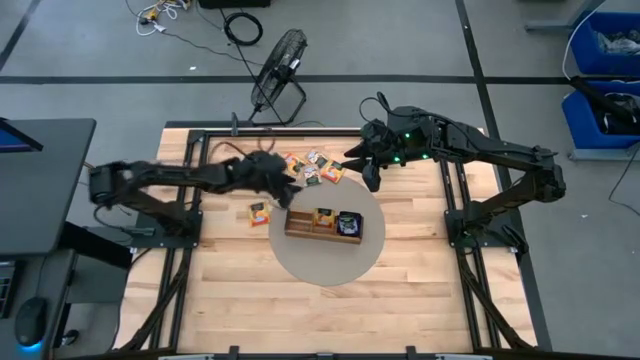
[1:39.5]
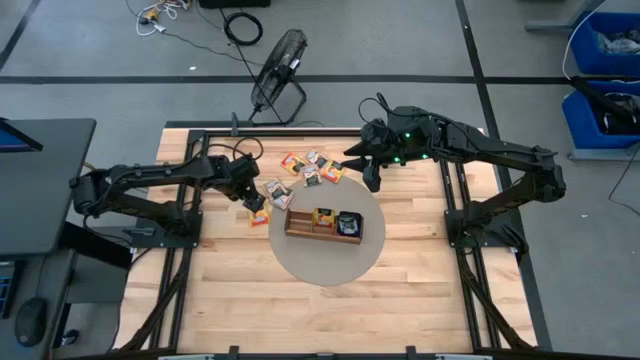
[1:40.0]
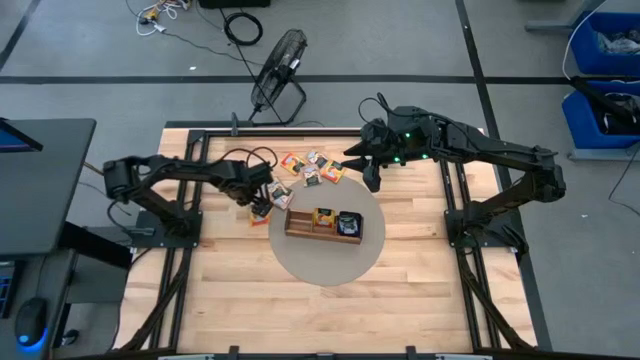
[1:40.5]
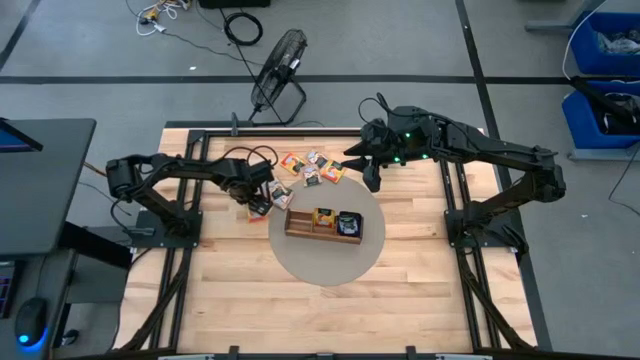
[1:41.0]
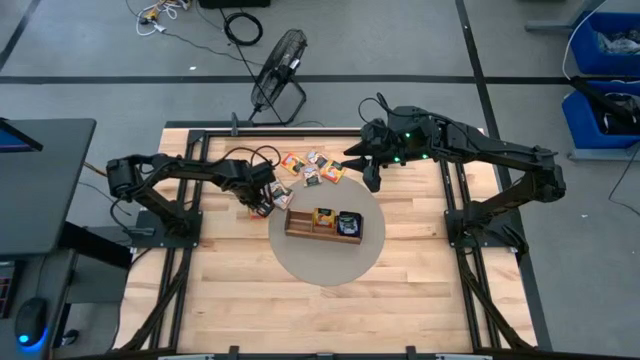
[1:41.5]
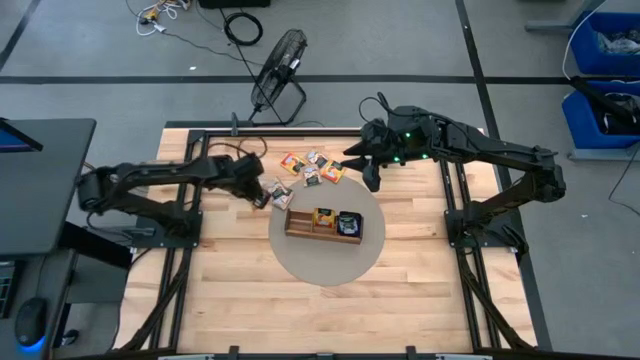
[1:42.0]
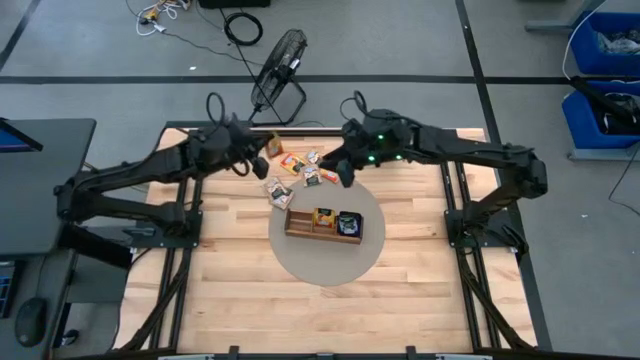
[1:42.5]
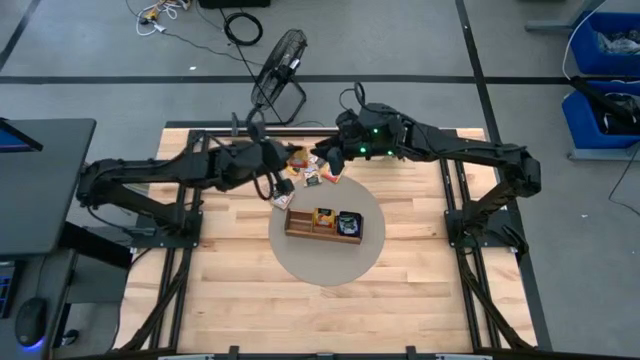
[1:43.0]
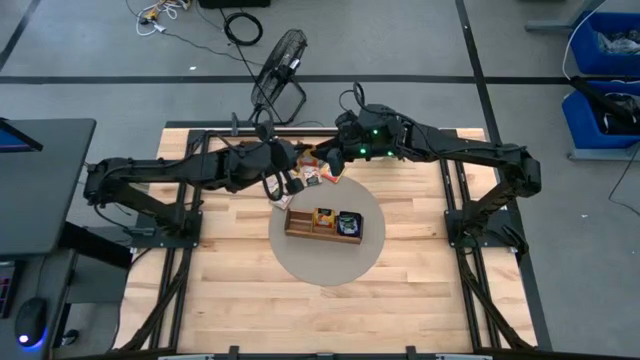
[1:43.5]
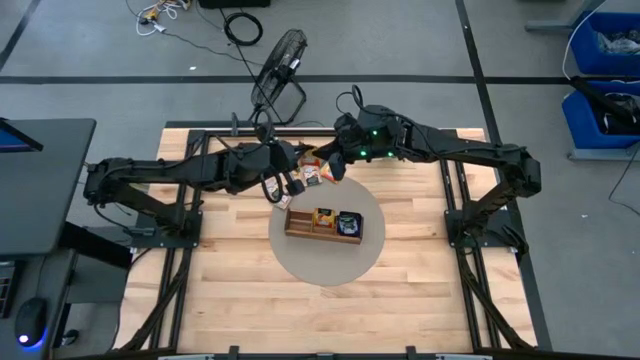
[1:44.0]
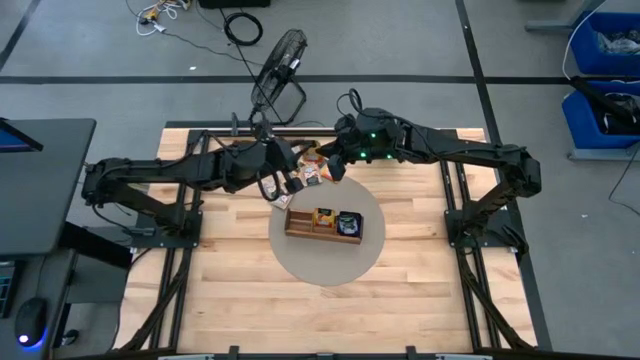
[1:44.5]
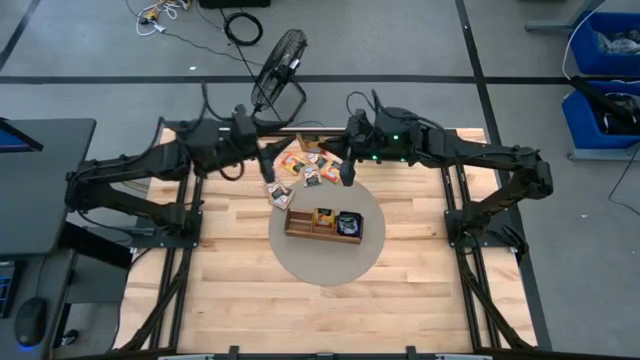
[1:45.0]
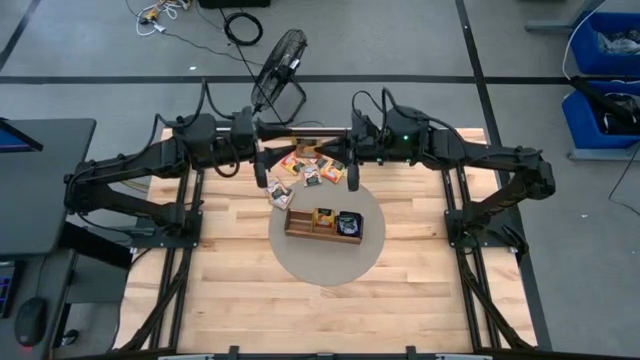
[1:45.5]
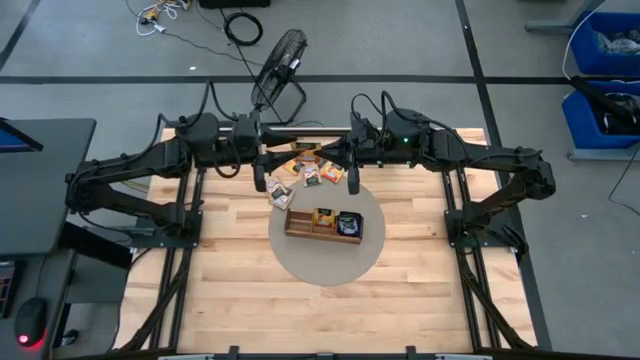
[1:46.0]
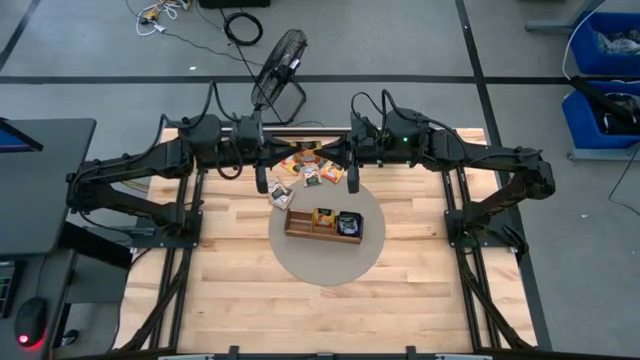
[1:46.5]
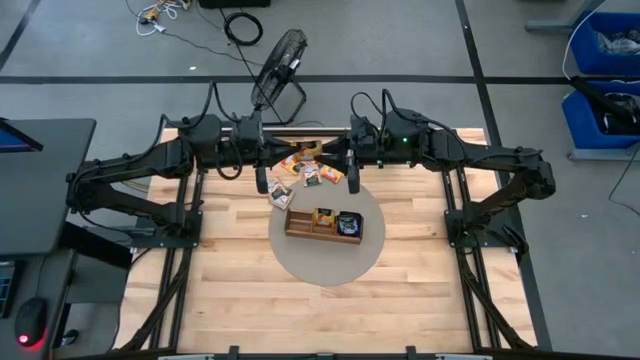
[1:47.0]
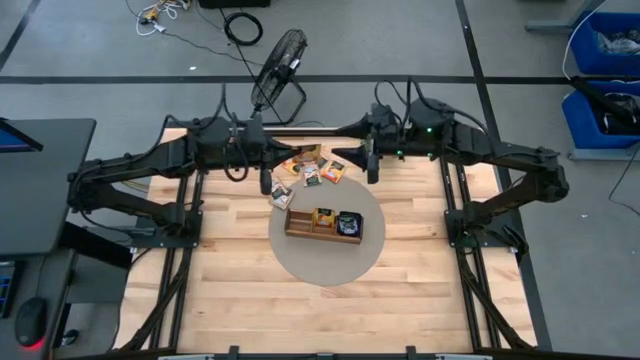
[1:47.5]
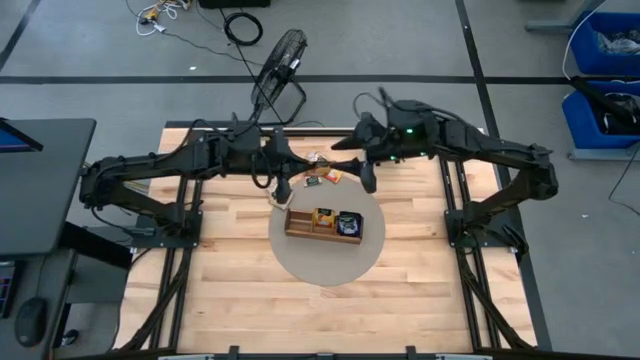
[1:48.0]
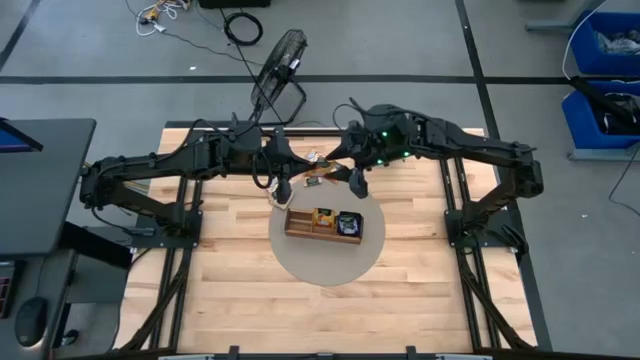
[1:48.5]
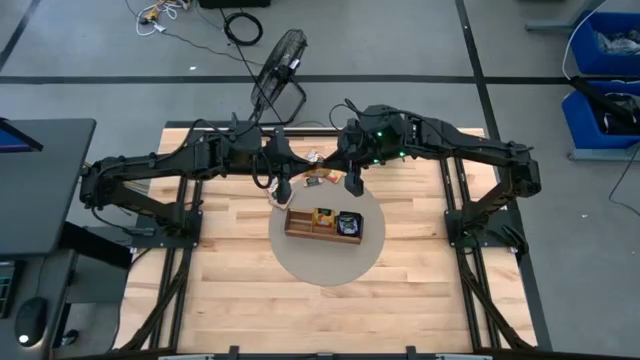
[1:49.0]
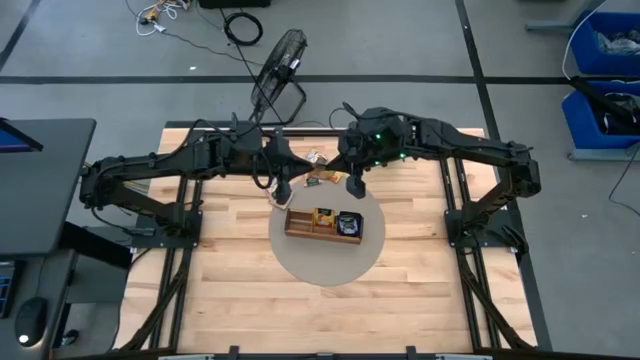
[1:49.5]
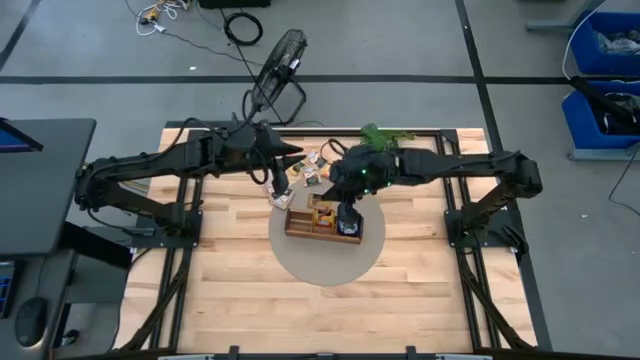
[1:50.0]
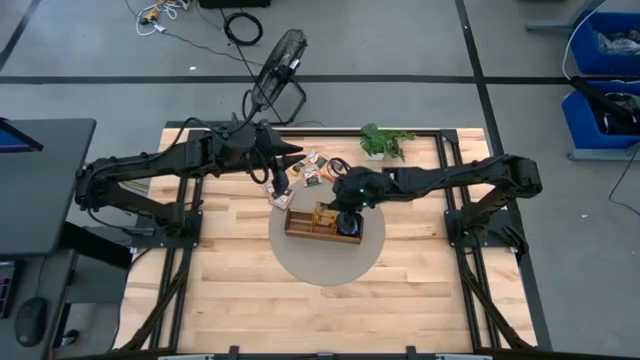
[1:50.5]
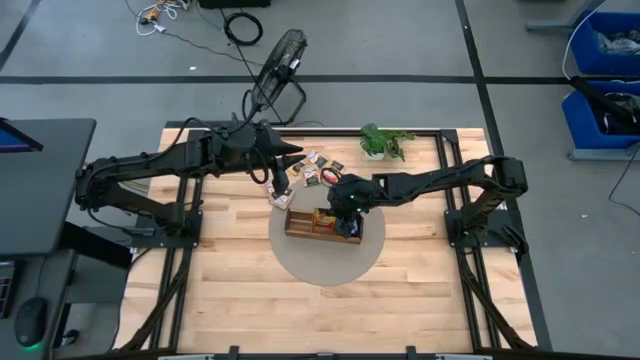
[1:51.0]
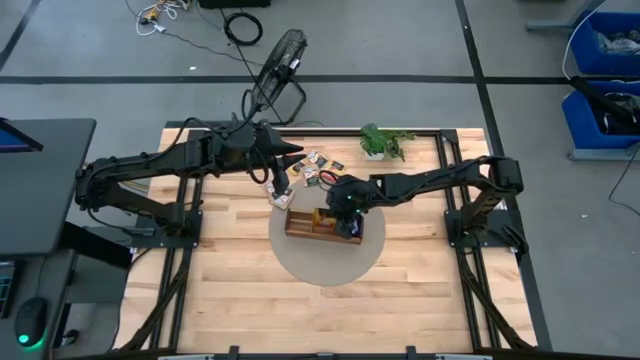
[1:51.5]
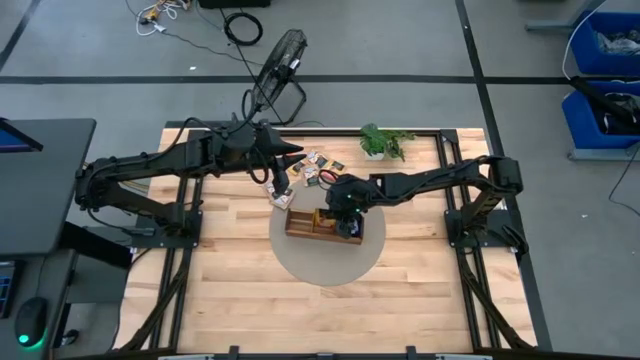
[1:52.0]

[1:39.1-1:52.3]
Task: Pick & Place Tea
Put the yellow tea bag into the middle section of the wooden organizer

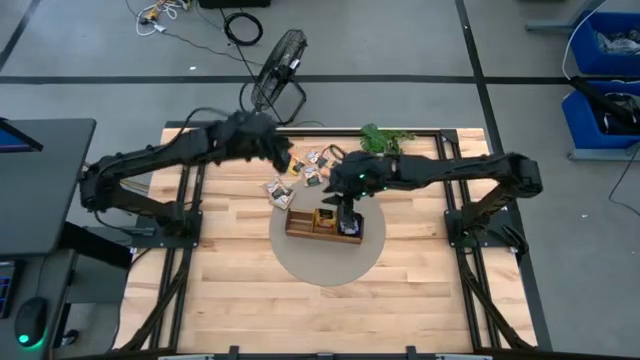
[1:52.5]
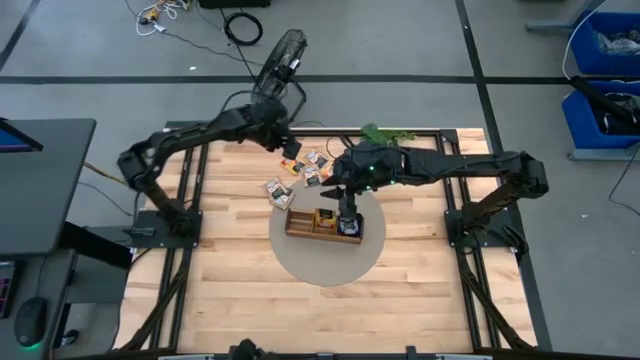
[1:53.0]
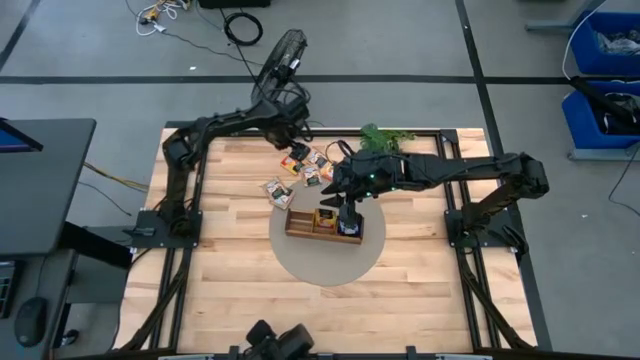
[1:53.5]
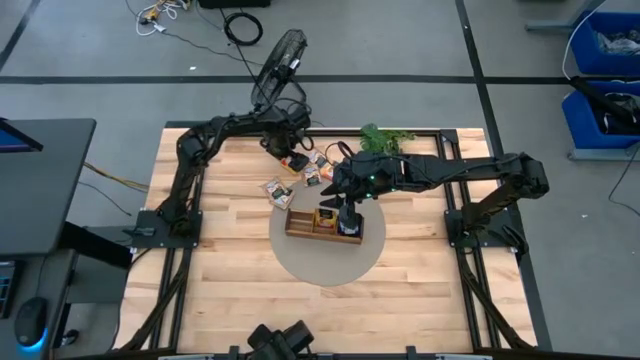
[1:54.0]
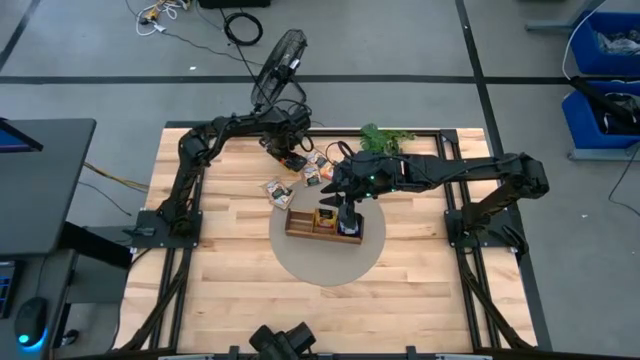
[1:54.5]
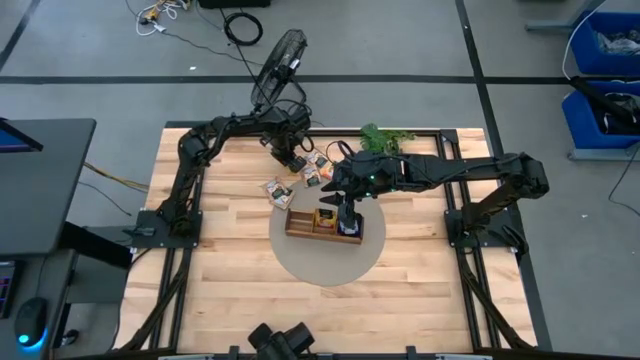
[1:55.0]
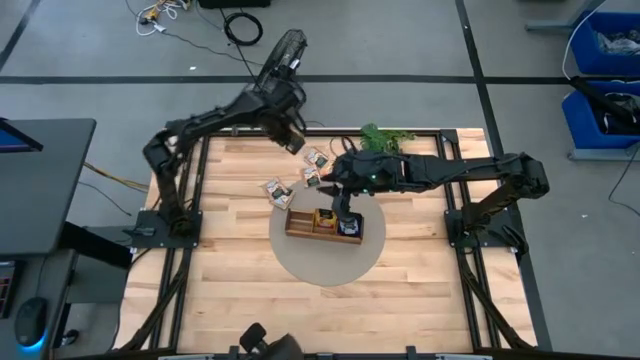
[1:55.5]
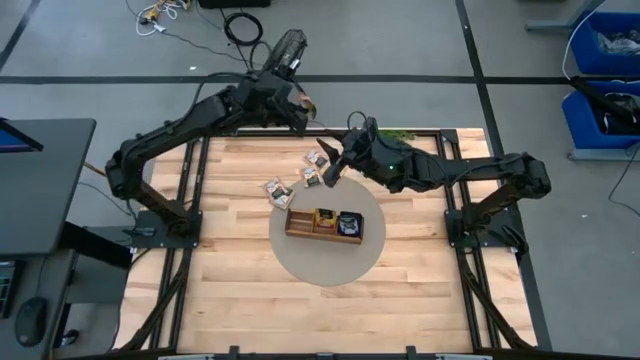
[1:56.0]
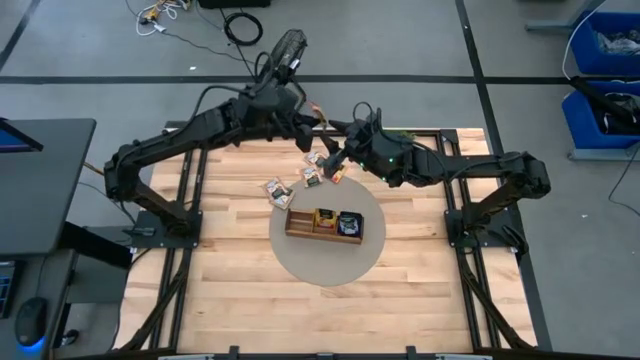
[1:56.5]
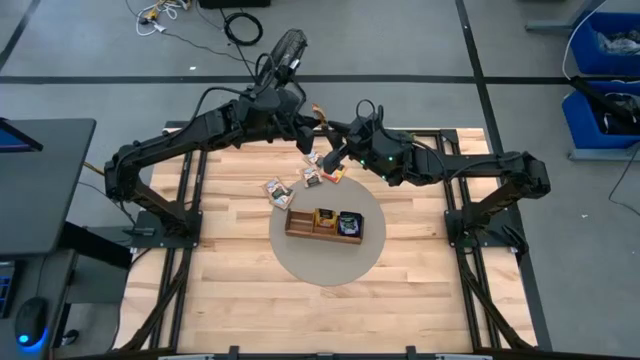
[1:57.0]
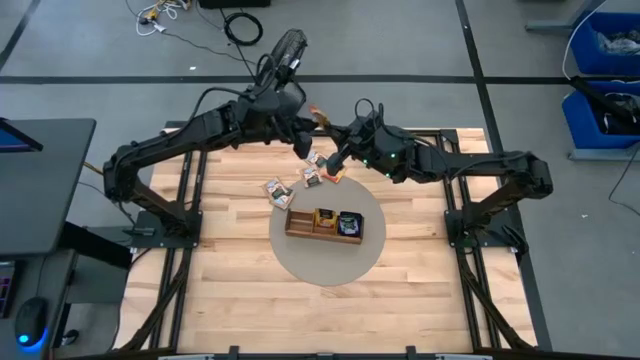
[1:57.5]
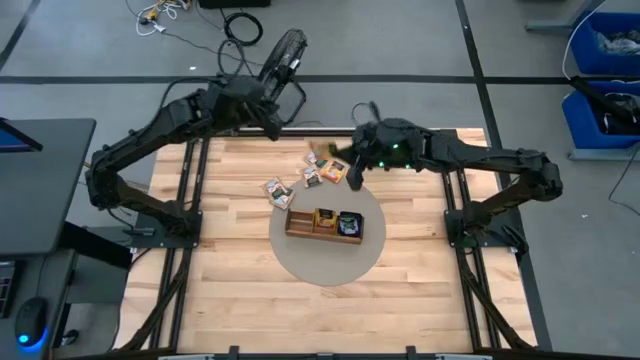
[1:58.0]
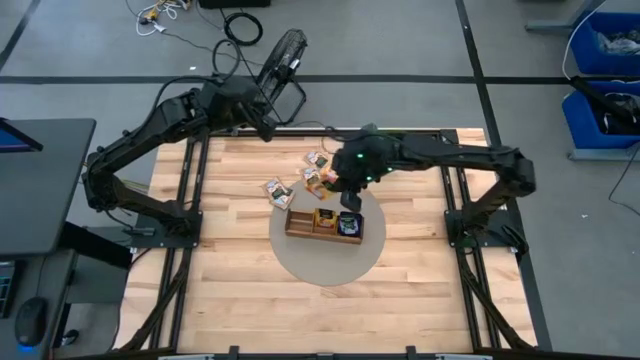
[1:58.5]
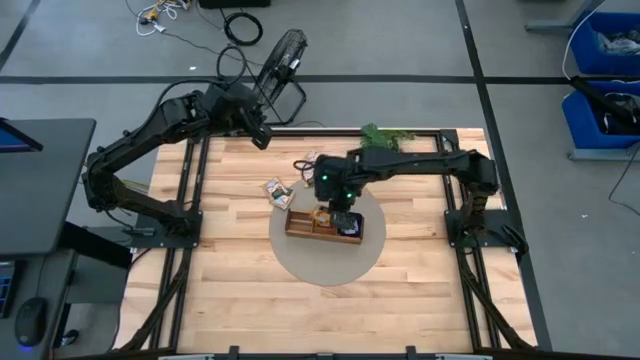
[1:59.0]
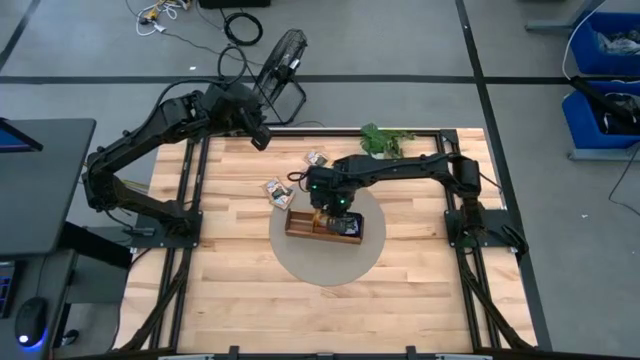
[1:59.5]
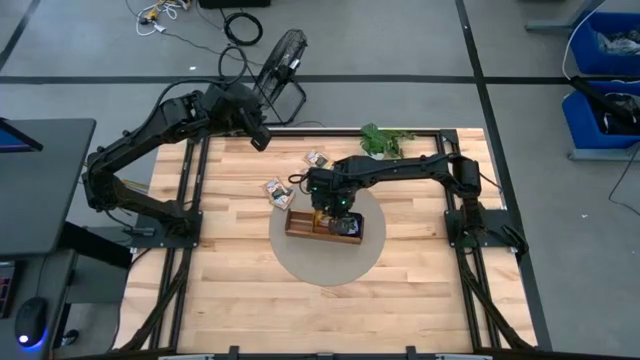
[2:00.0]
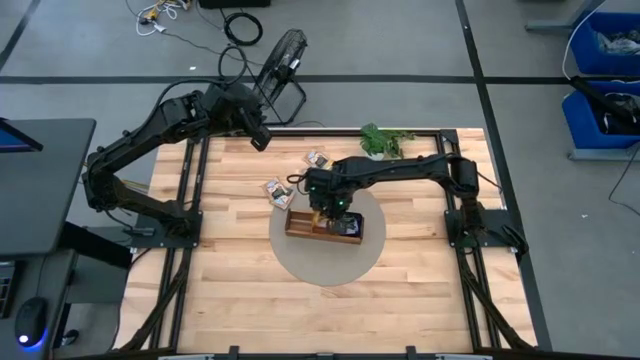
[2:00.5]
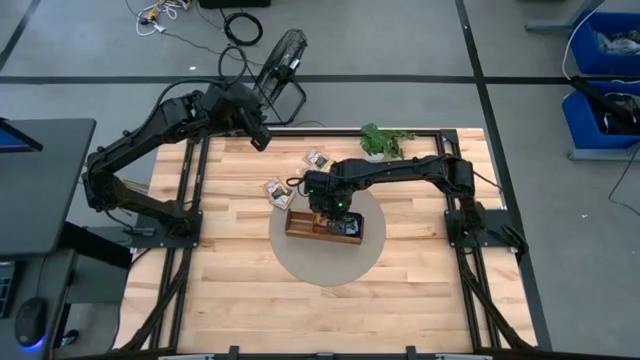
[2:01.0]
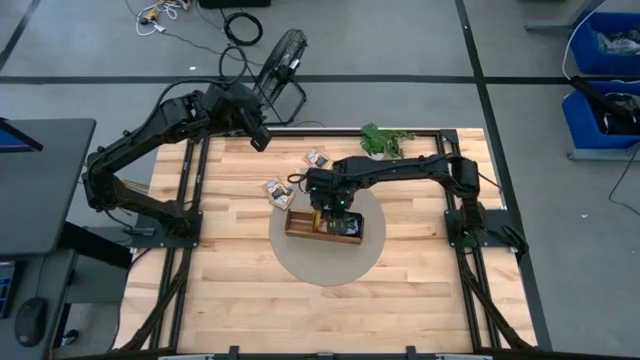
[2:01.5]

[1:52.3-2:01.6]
Put the yellow tea bag into the middle section of the wooden organizer
